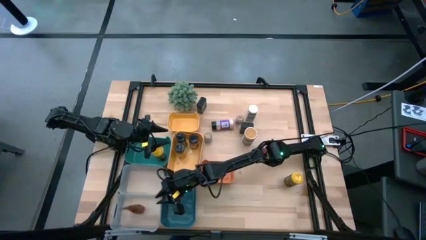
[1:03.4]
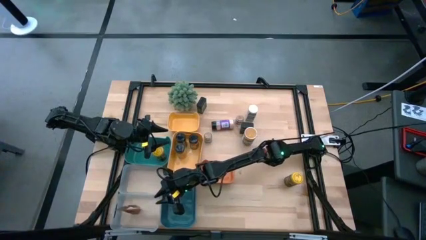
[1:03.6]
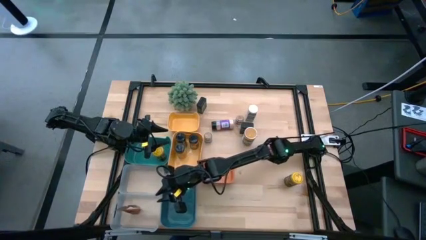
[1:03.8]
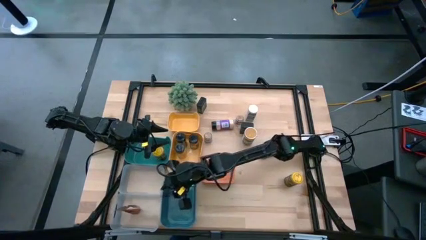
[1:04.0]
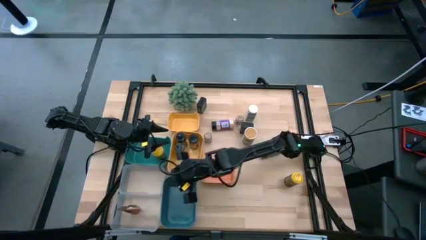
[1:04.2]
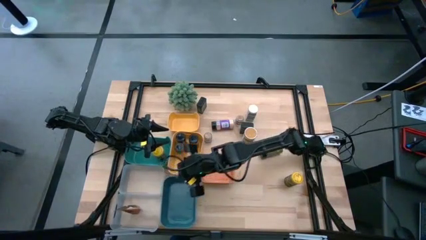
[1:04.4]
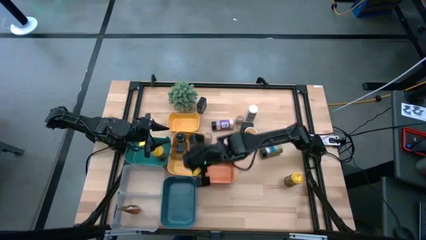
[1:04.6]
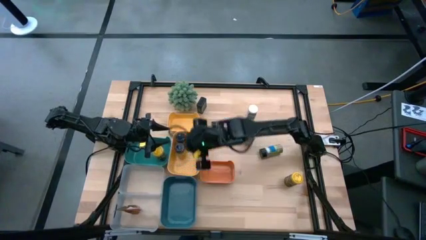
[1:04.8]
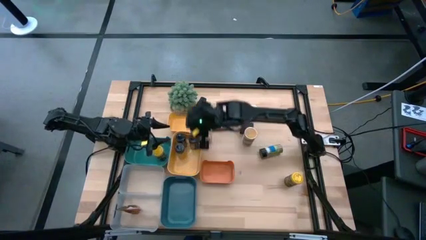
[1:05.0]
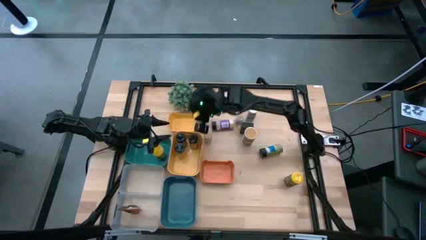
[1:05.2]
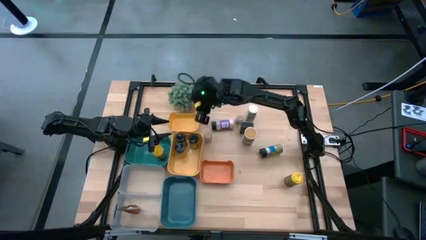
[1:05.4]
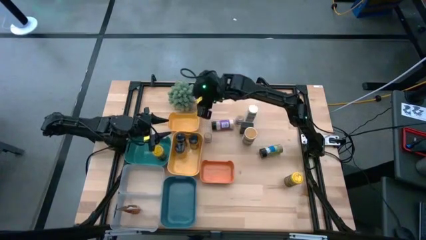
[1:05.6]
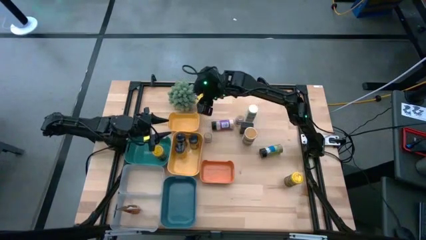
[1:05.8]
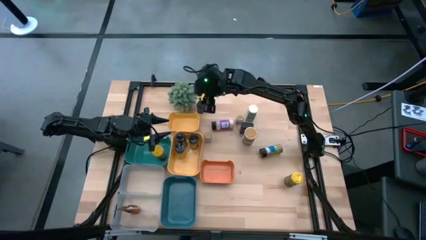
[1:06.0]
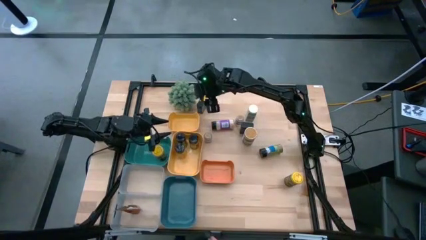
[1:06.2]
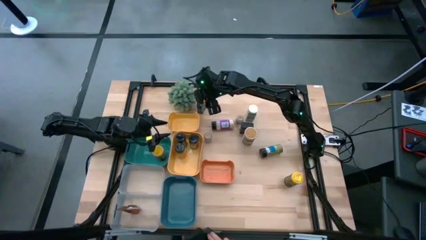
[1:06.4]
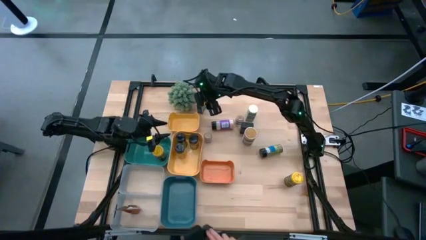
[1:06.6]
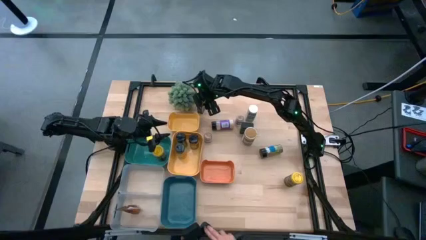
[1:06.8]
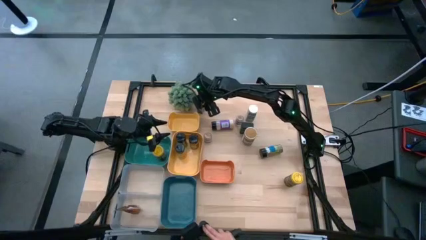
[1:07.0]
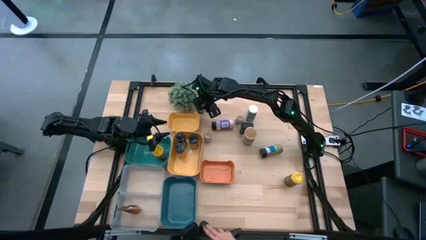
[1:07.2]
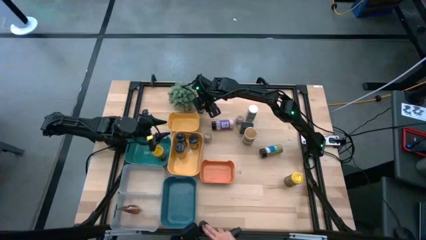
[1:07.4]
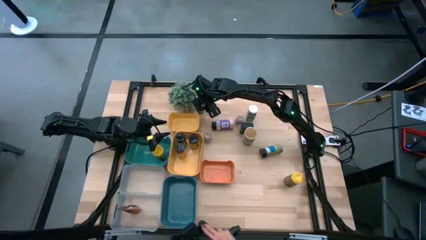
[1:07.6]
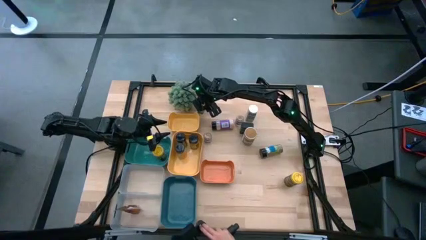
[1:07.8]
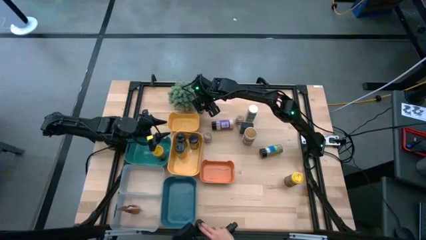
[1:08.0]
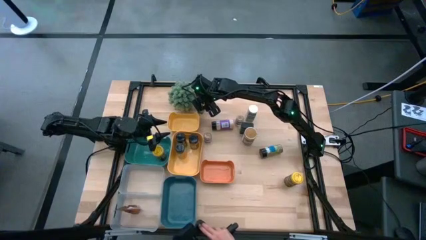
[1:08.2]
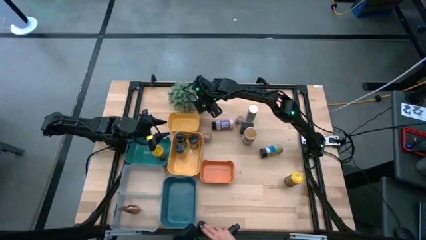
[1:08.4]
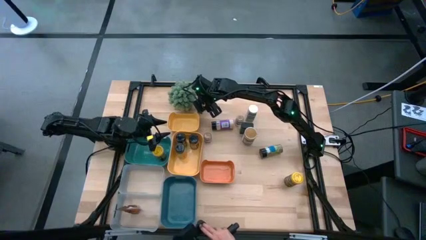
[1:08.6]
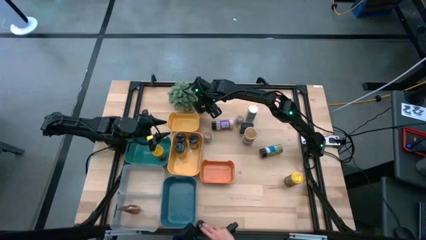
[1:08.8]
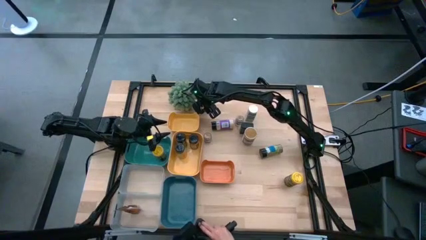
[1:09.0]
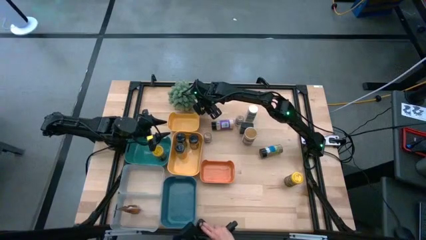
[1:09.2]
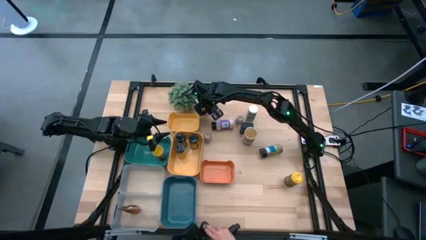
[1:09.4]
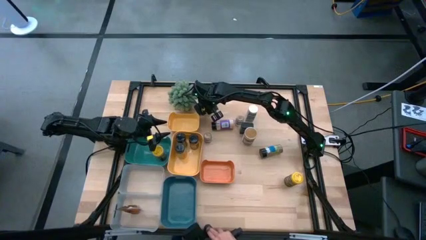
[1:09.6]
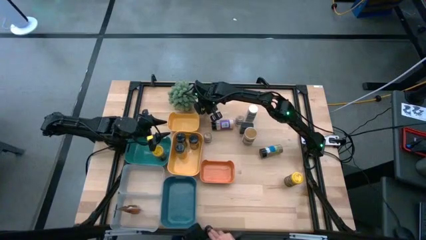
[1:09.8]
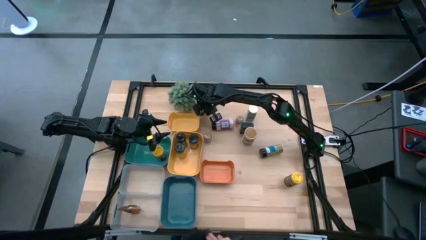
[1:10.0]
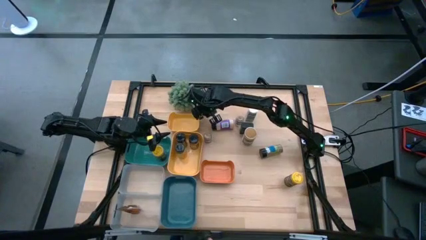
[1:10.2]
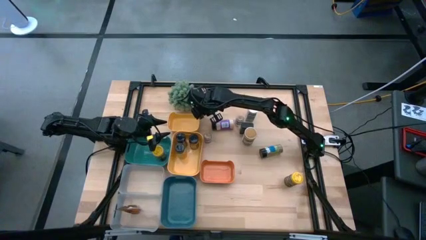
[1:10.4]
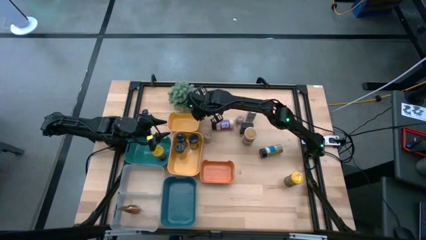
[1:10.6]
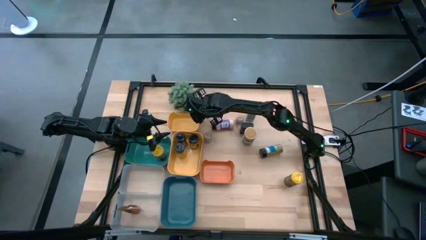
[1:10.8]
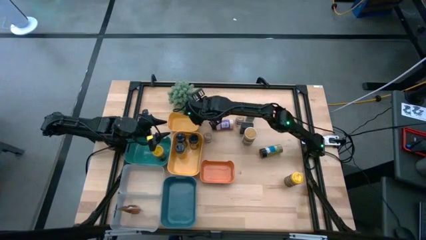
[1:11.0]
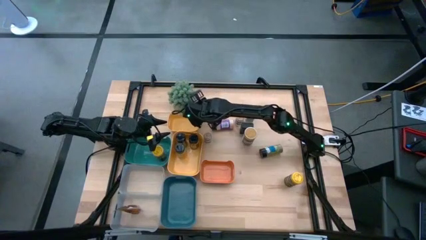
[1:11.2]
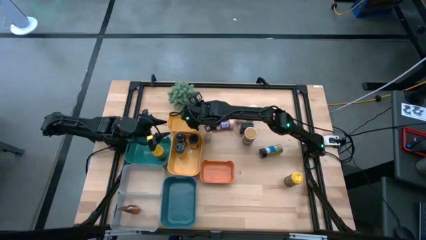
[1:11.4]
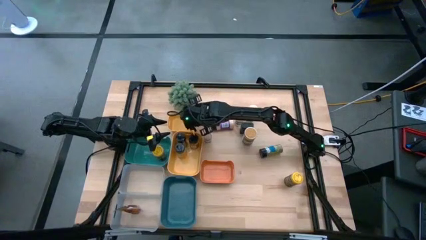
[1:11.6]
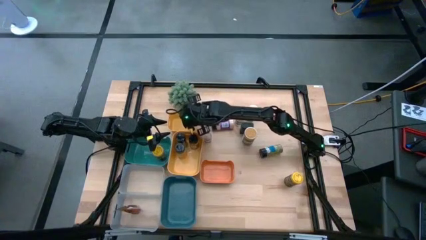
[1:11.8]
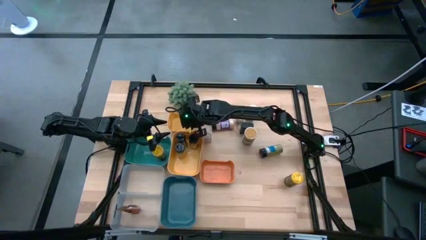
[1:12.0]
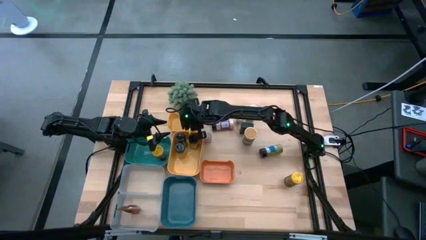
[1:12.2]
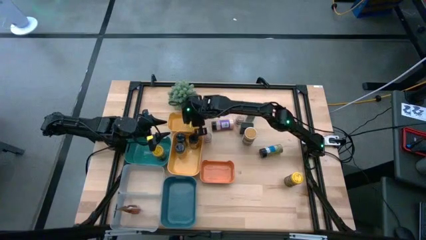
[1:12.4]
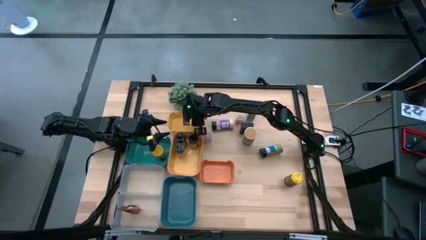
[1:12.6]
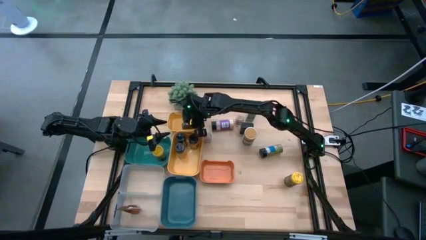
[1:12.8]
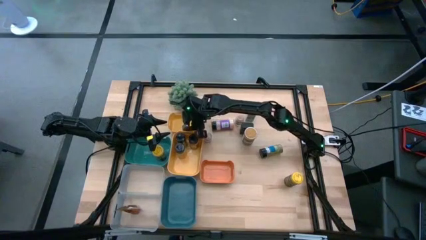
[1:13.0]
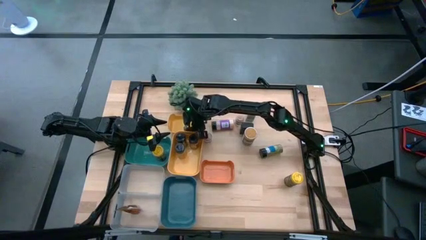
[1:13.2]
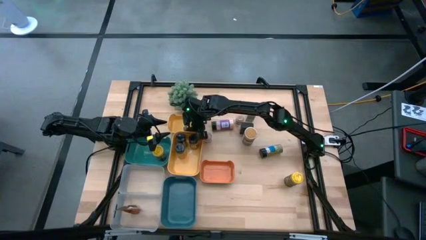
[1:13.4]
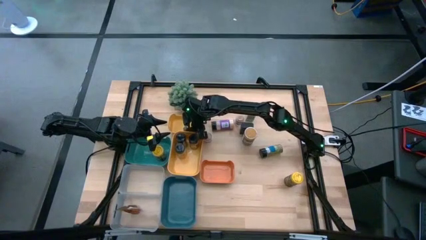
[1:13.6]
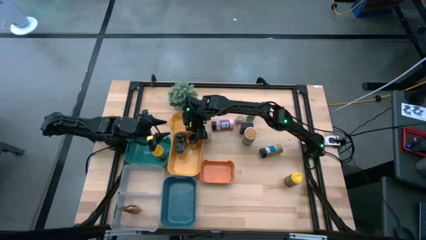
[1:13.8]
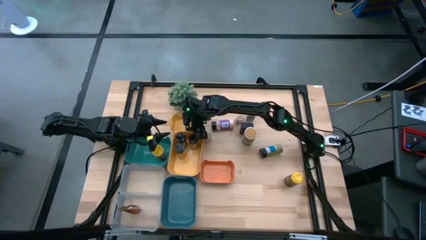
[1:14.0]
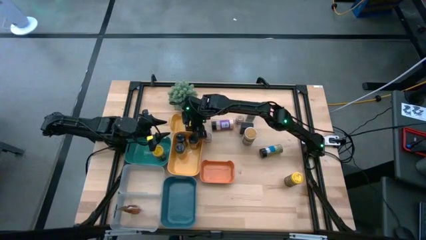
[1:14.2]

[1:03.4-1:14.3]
Task: Sort spices by type
Put the black seasoning can into the top yellow bin
